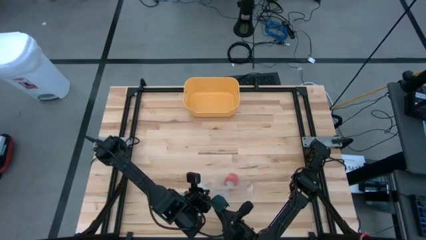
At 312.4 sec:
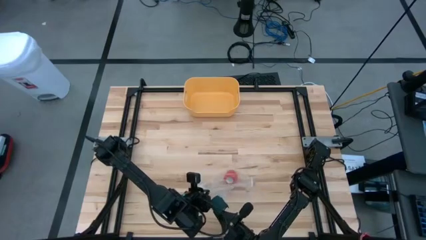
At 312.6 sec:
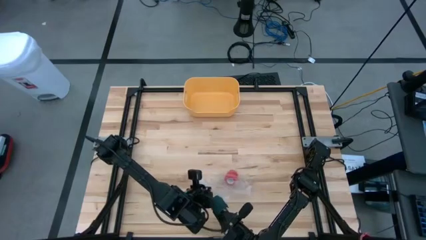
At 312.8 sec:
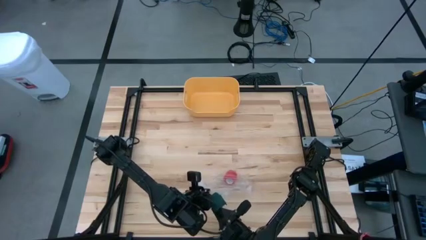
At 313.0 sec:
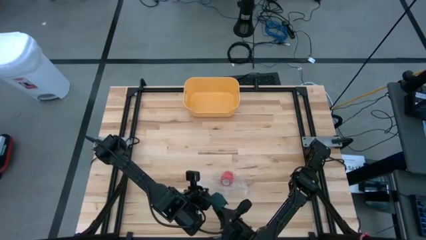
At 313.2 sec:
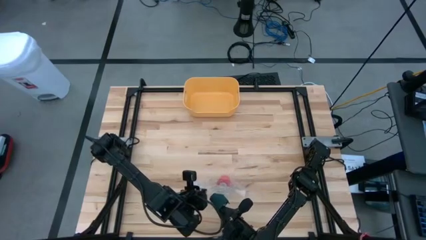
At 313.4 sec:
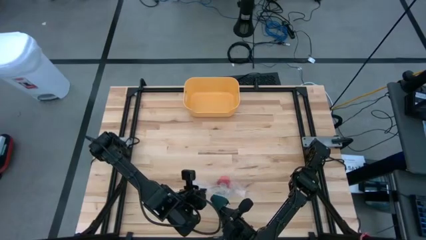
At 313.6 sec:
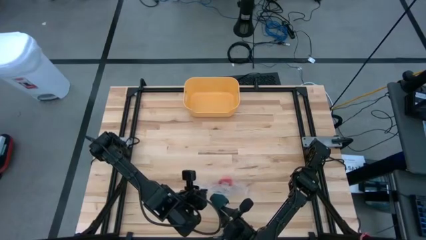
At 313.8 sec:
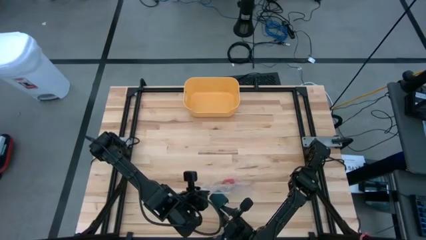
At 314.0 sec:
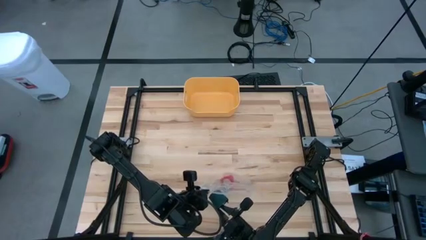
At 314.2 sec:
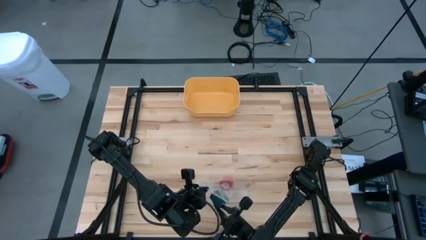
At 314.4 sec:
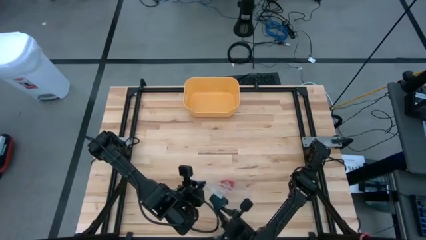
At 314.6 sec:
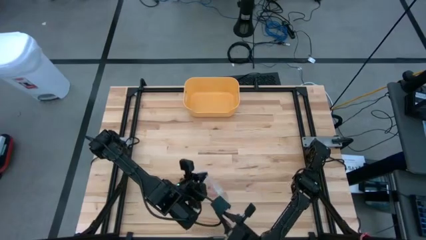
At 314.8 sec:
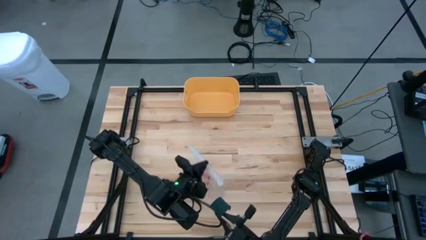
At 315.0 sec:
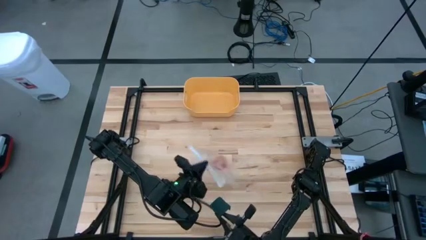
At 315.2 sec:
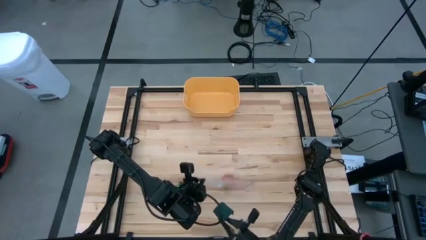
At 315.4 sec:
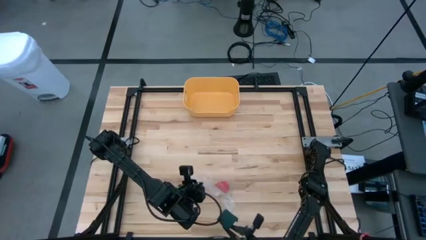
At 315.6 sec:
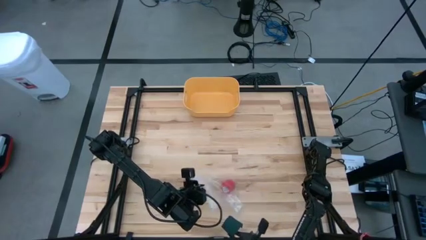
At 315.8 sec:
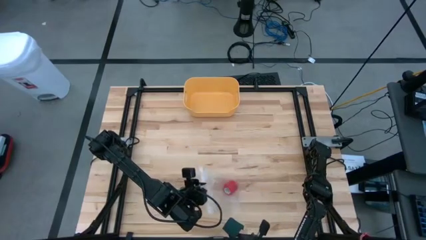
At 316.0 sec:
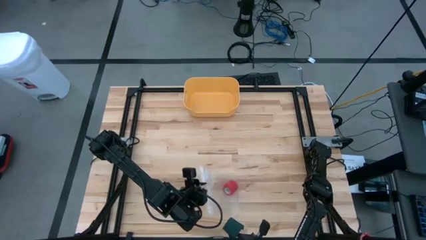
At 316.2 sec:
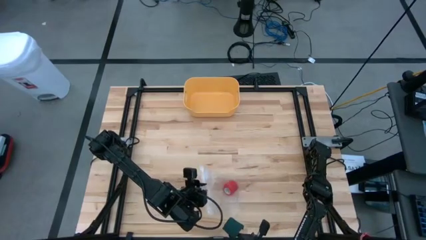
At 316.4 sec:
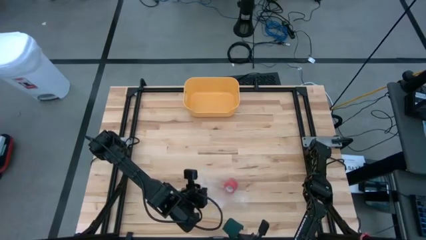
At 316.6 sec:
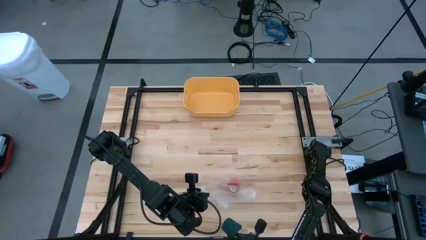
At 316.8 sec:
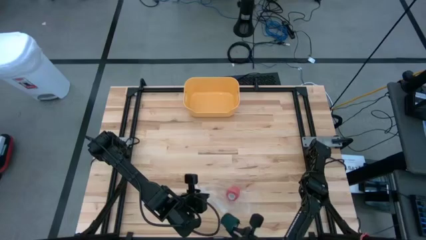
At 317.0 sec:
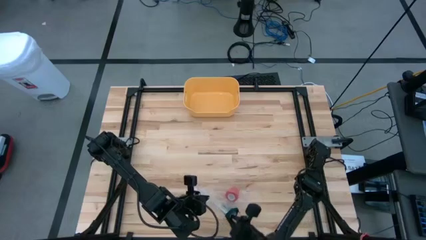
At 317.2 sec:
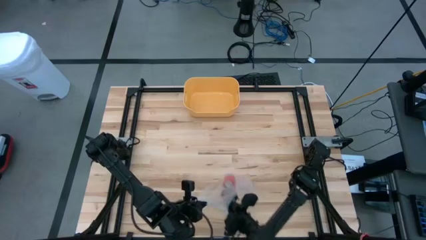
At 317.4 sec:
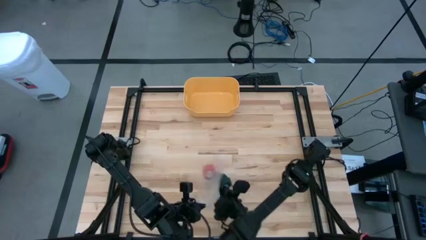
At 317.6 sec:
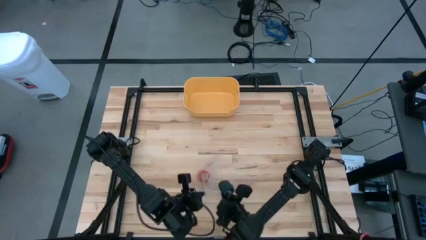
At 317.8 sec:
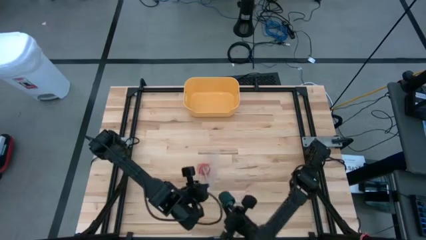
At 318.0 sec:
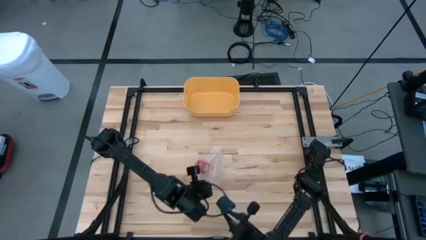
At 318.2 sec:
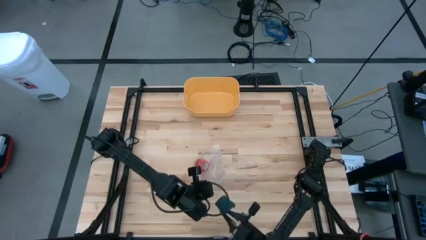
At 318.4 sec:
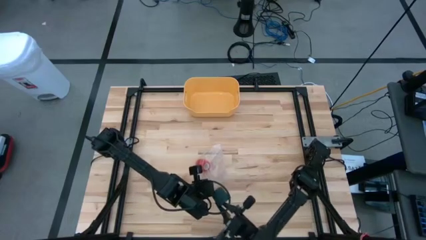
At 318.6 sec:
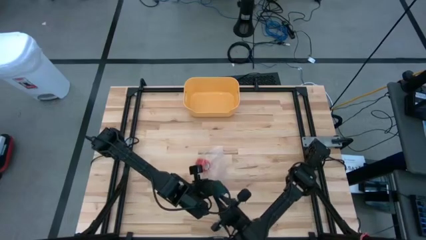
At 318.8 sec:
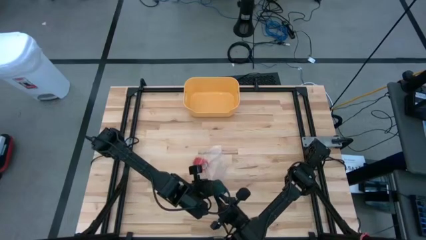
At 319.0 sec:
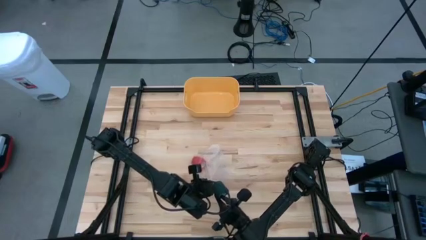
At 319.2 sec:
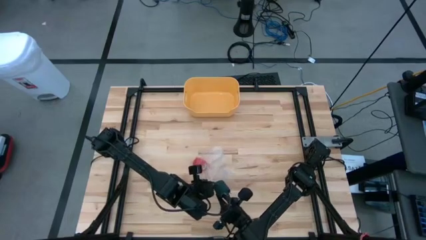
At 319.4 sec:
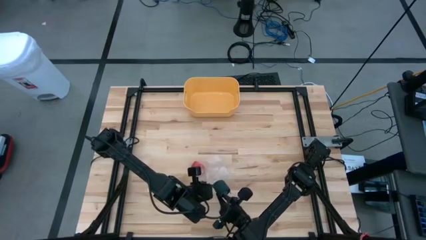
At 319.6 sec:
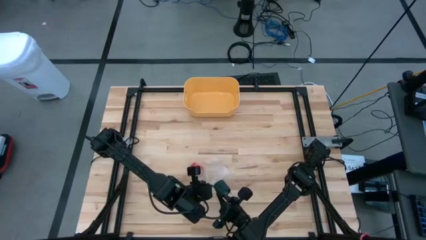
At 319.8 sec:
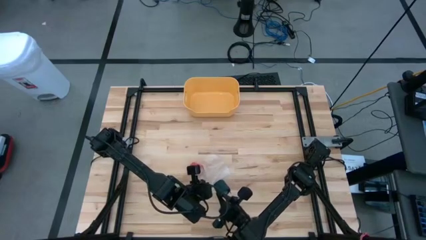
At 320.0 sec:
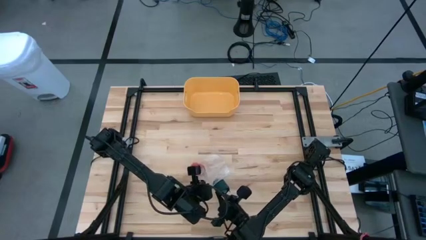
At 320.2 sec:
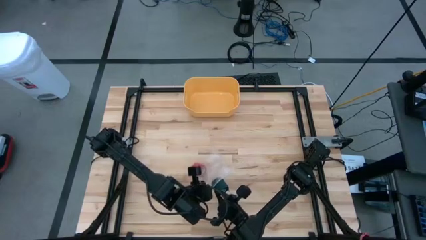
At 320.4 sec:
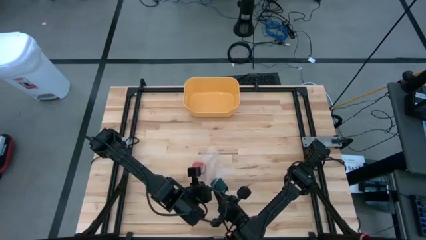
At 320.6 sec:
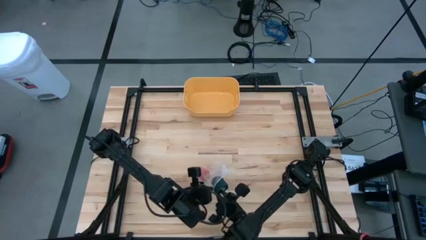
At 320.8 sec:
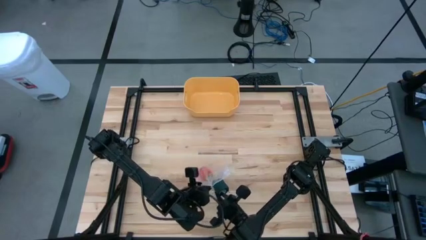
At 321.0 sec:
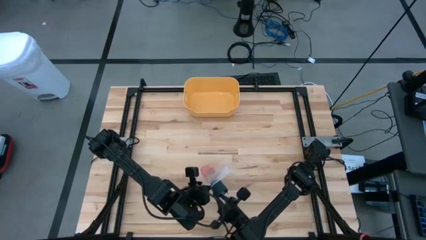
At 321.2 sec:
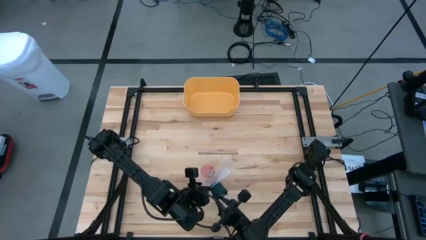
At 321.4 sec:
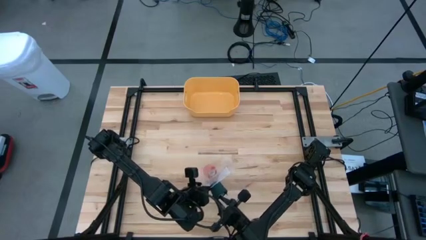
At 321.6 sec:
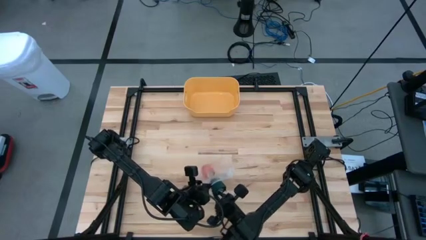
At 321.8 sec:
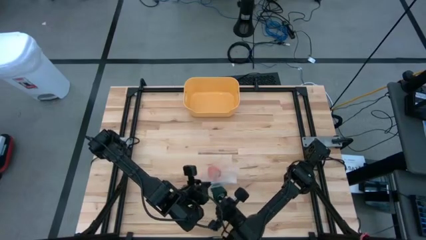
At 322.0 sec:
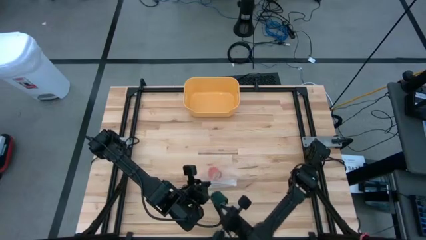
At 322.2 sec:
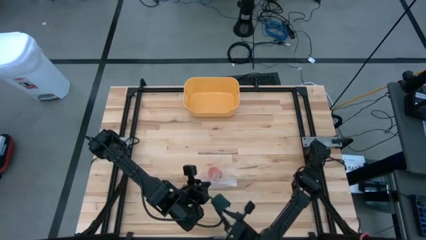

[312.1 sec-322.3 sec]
Task: Roll bandage
Put the rolled green bandage into the transparent zip bag

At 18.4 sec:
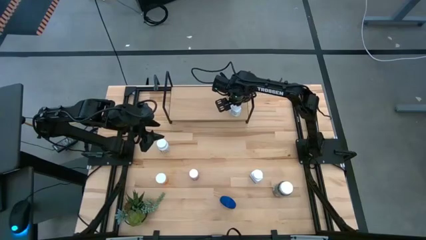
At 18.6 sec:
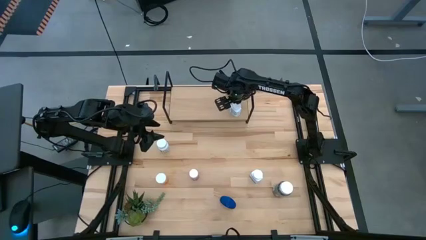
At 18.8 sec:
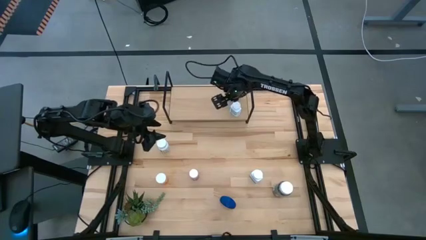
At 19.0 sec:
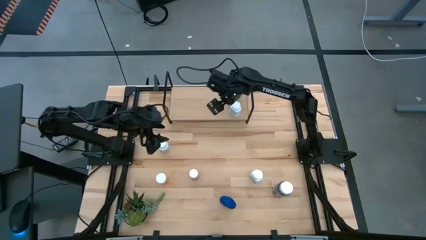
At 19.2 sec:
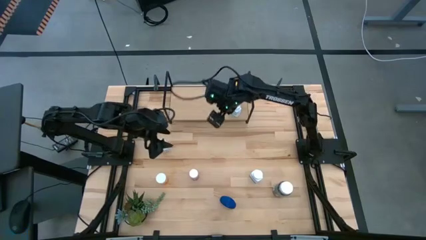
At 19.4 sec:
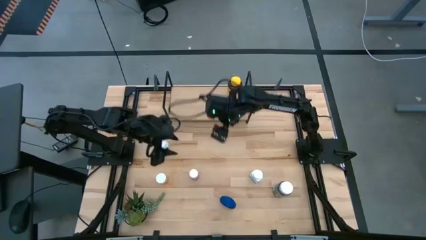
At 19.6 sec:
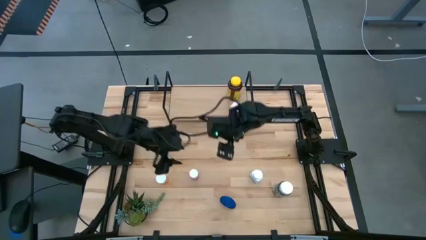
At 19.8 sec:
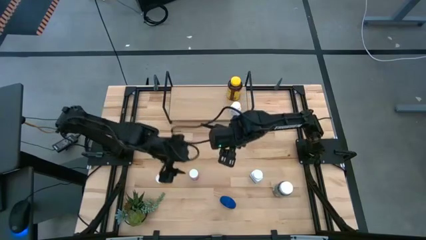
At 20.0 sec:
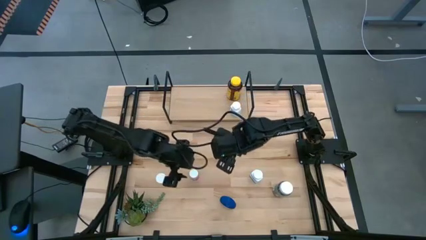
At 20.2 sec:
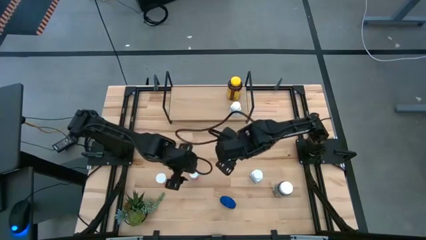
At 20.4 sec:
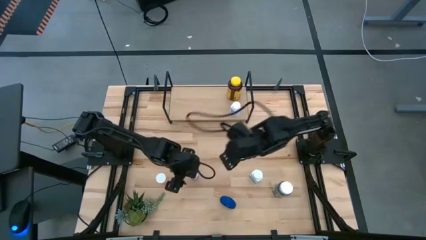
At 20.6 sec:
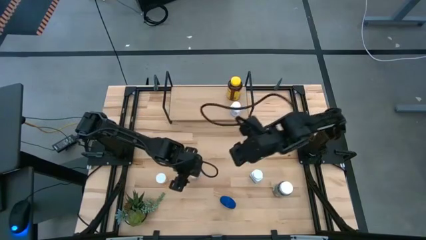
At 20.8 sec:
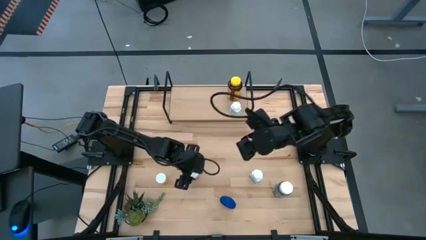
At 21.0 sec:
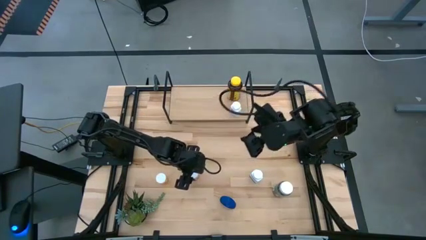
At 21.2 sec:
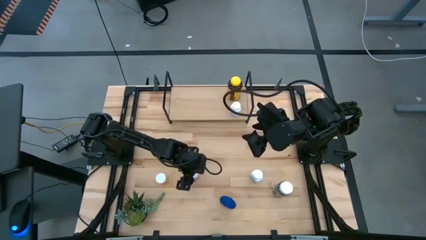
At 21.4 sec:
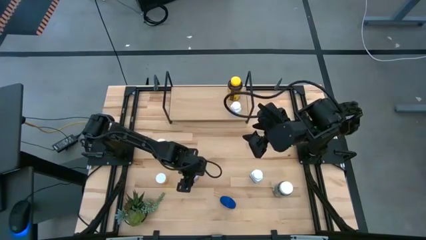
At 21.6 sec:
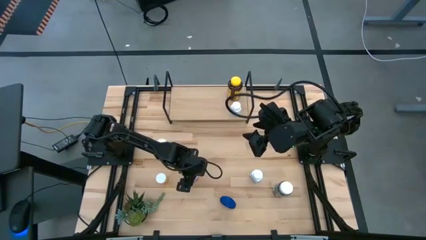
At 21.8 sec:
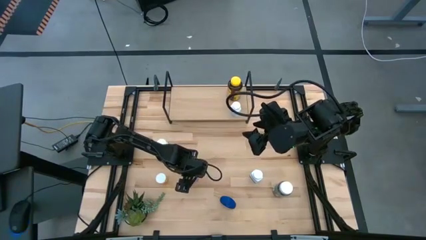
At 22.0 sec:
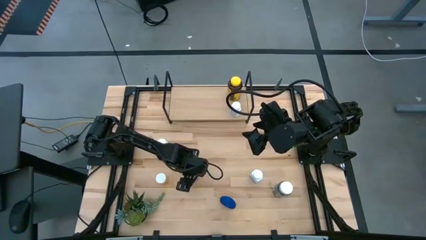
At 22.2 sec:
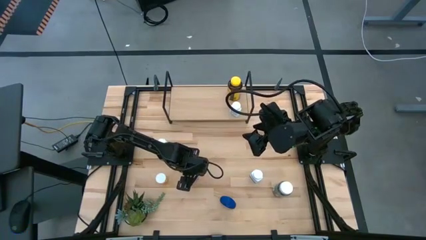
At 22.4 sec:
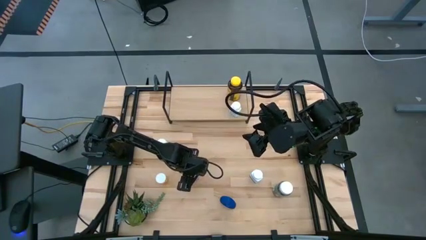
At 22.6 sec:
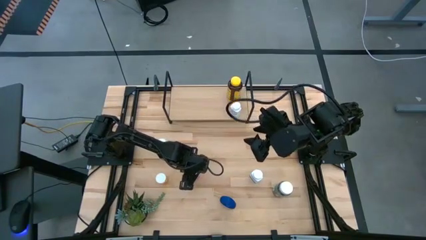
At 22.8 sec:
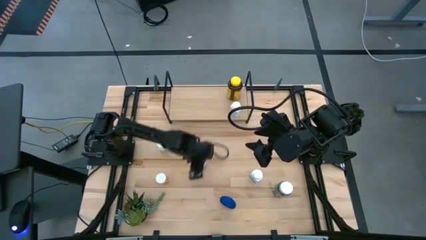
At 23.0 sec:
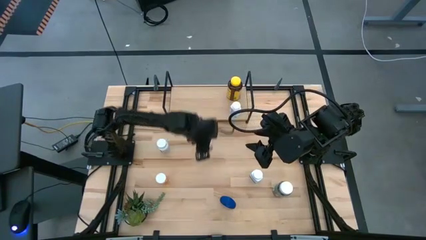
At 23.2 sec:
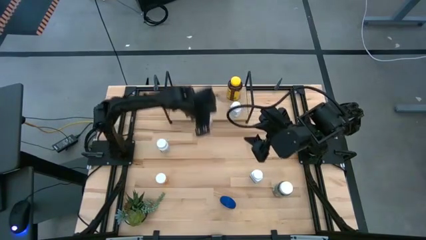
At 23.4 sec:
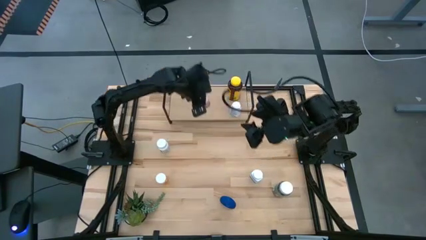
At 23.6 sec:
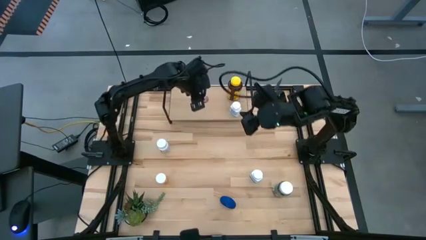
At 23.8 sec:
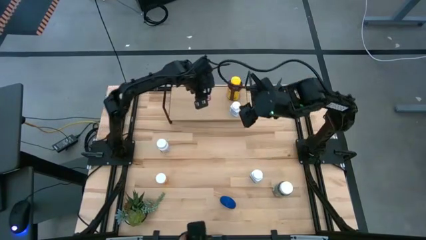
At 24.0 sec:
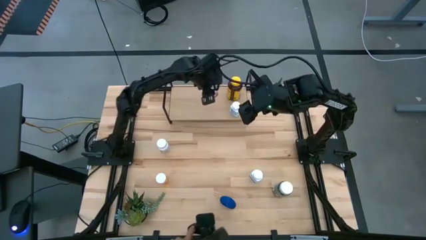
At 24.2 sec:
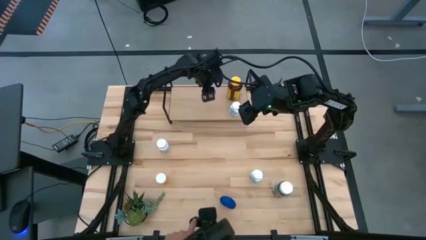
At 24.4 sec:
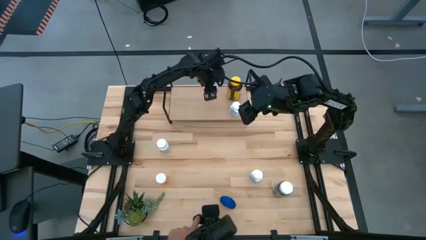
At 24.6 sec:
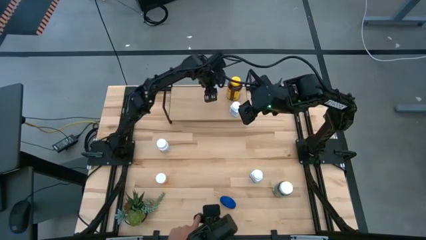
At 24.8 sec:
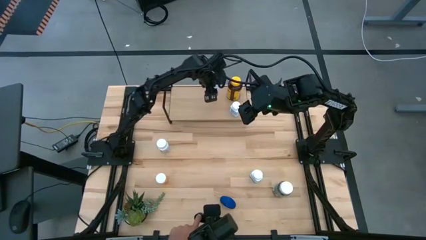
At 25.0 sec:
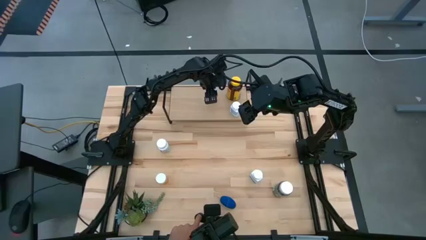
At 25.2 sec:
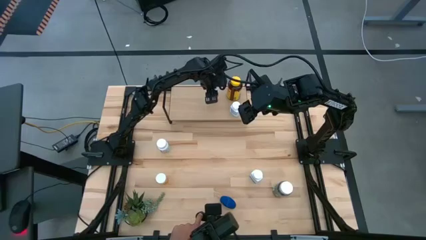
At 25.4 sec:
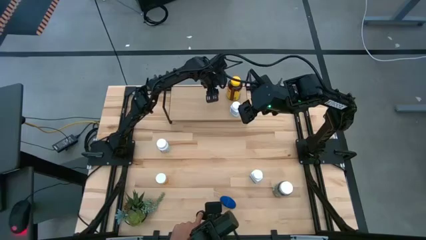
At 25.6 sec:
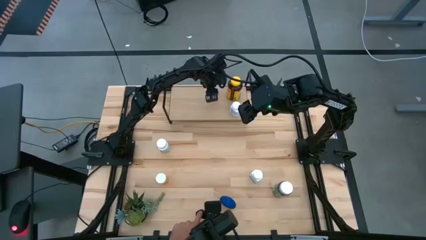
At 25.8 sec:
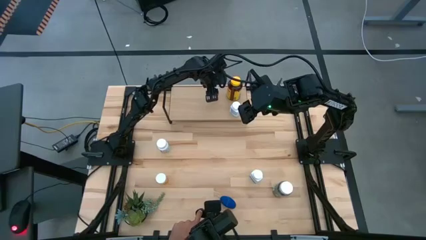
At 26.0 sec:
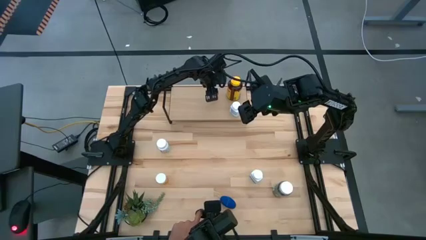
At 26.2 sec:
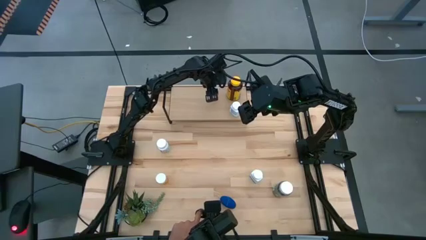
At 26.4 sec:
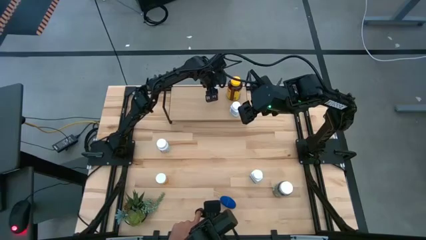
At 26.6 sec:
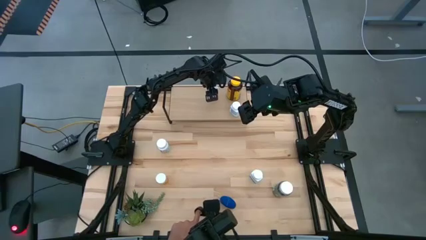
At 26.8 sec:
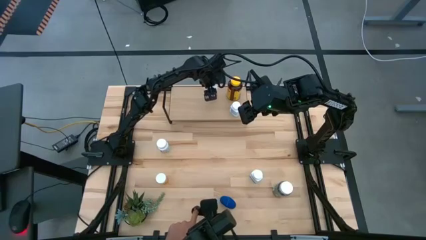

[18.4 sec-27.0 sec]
Task: Pick and place medicine bottles onto shelf by color
Put the pink pill bottle on the shelf
